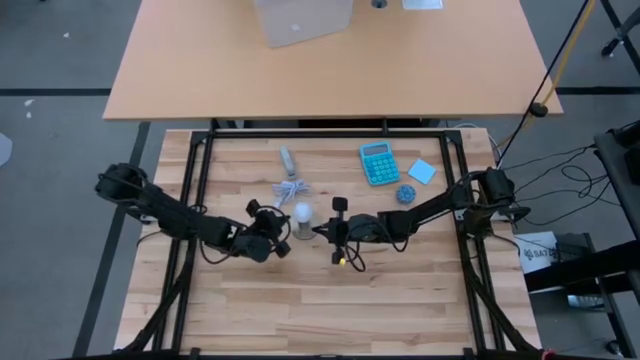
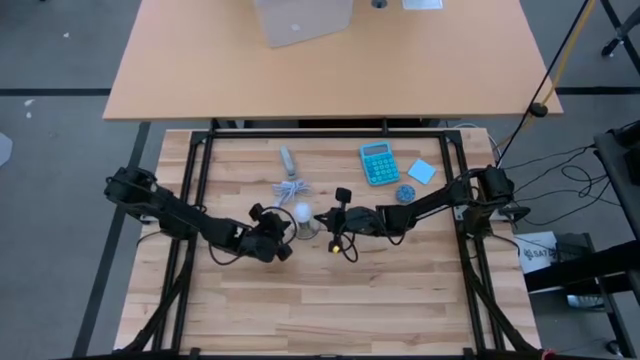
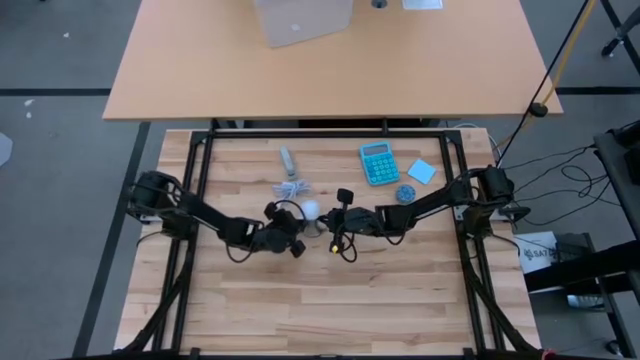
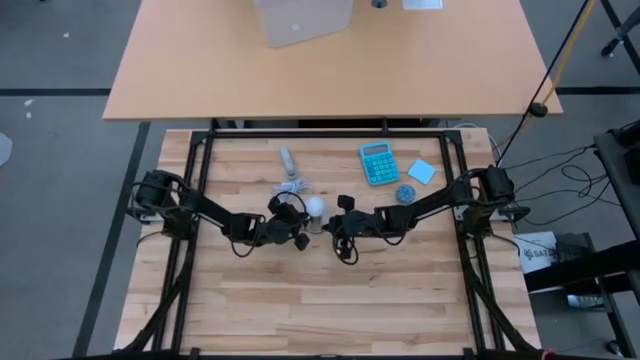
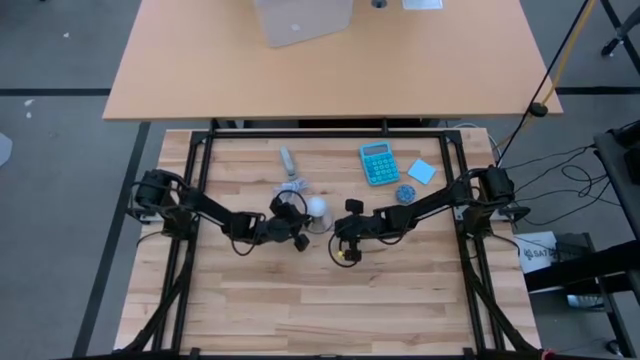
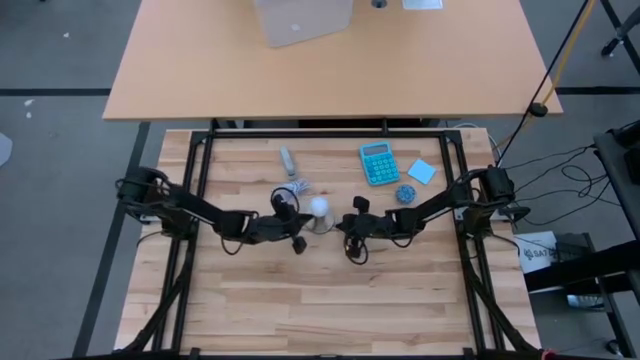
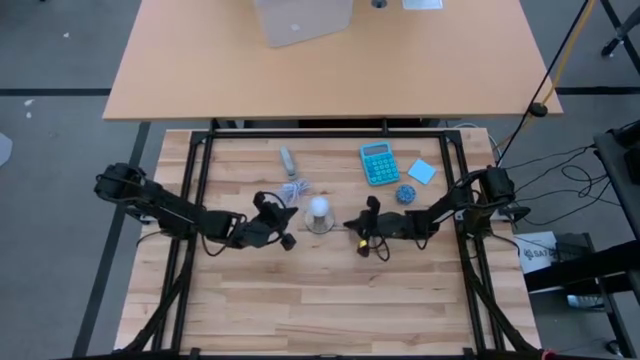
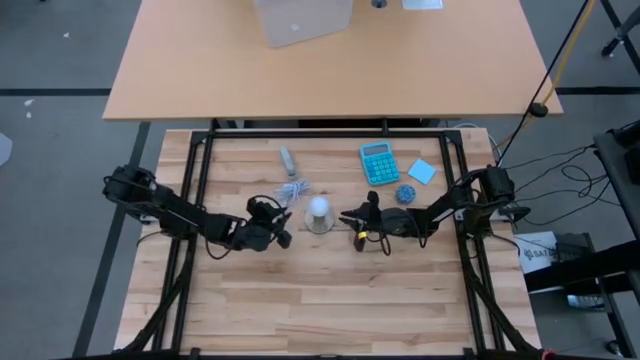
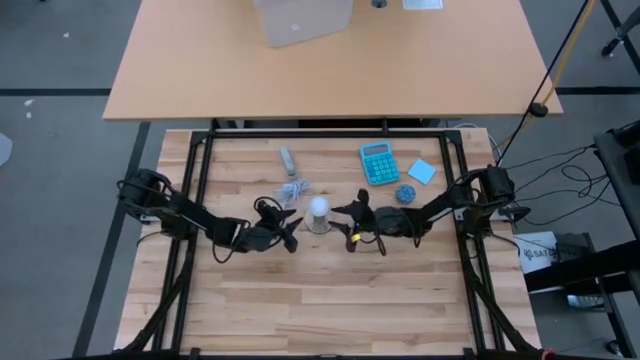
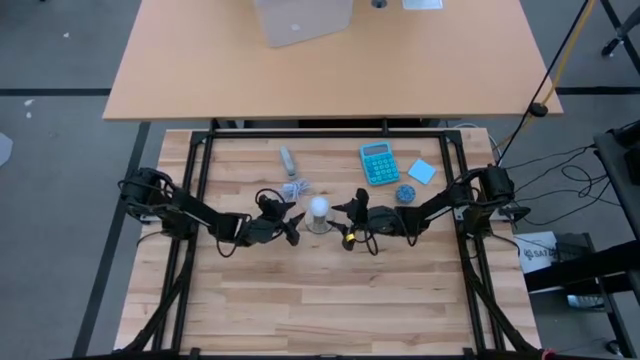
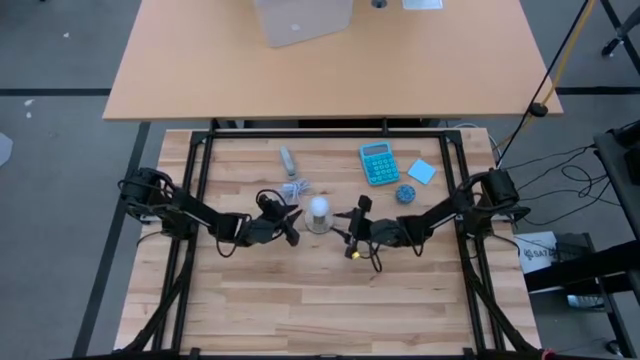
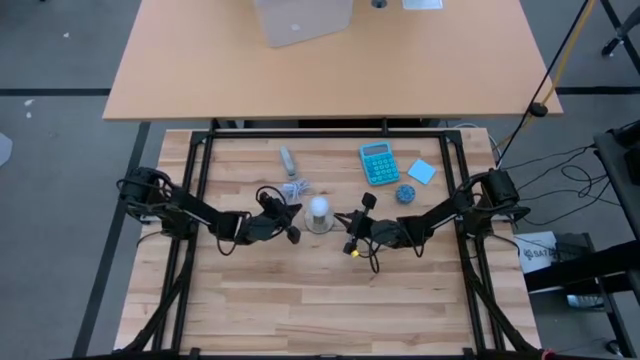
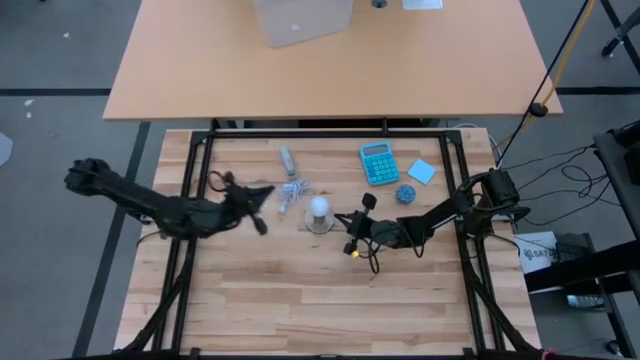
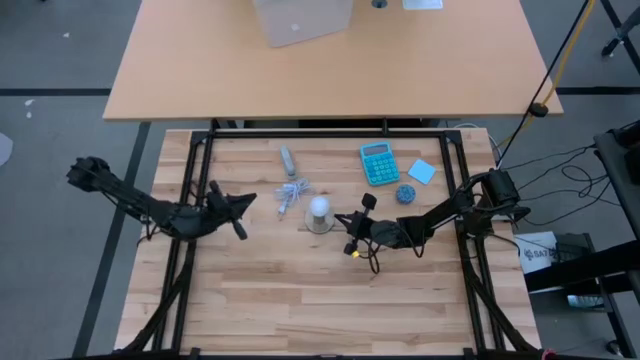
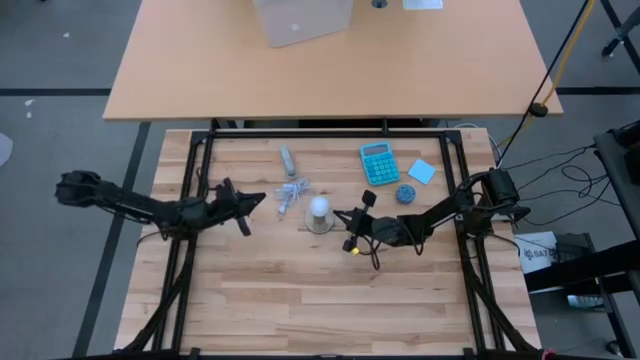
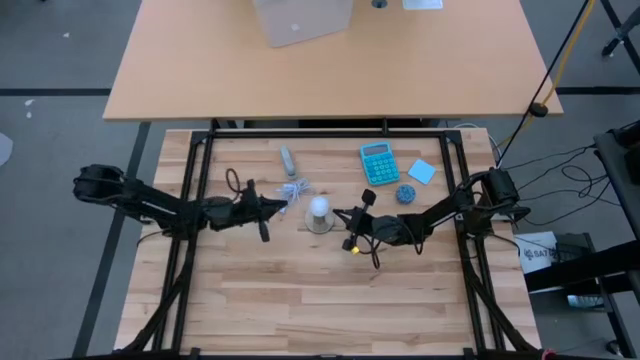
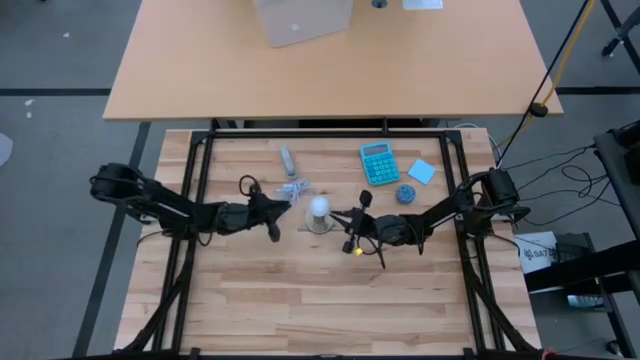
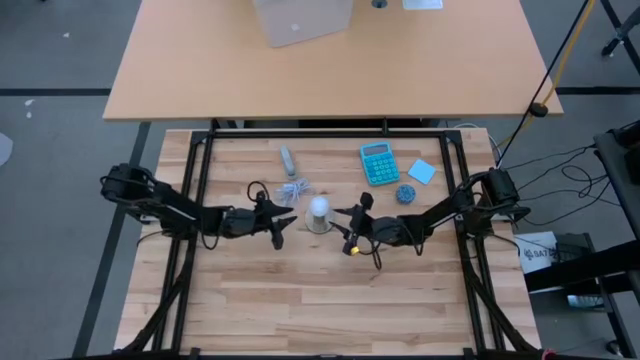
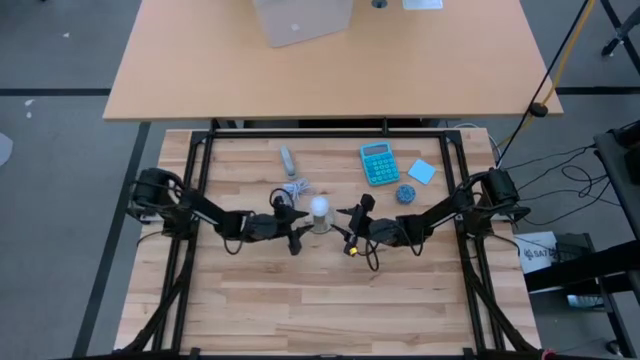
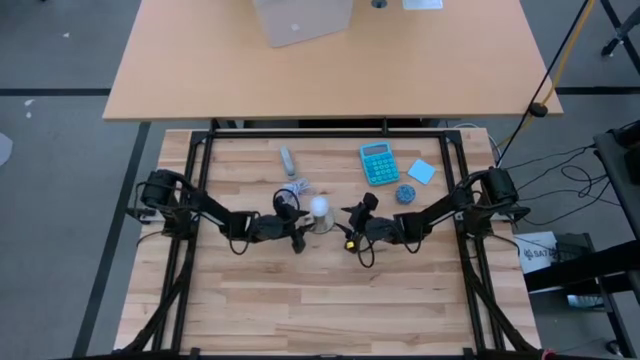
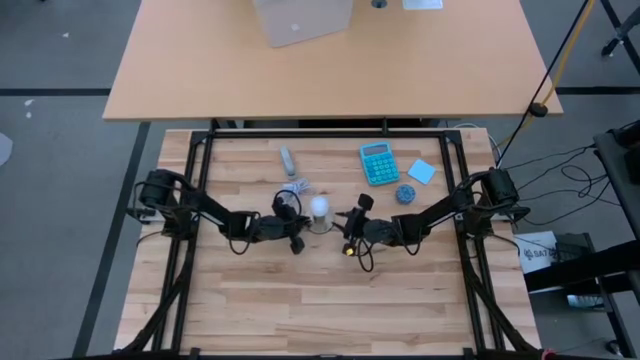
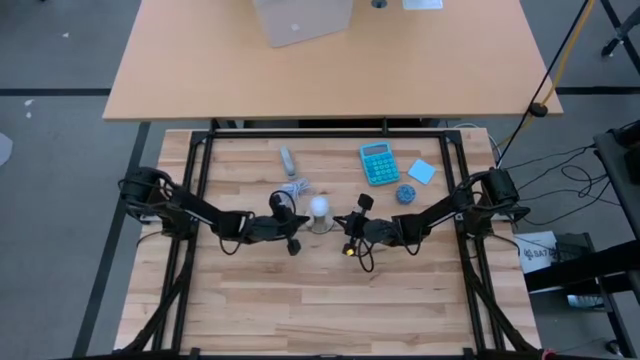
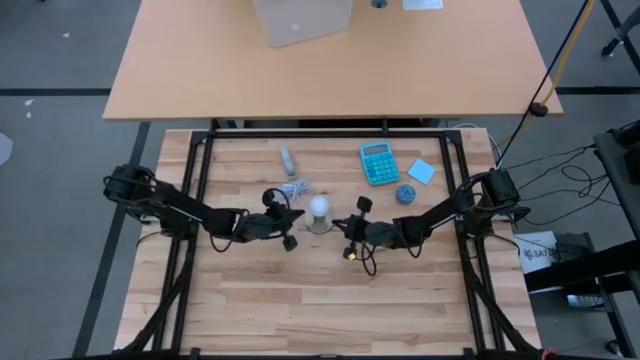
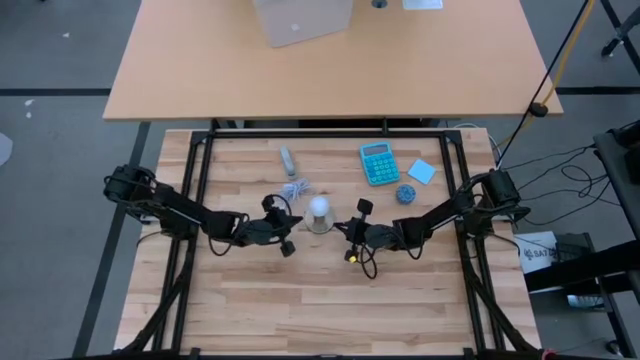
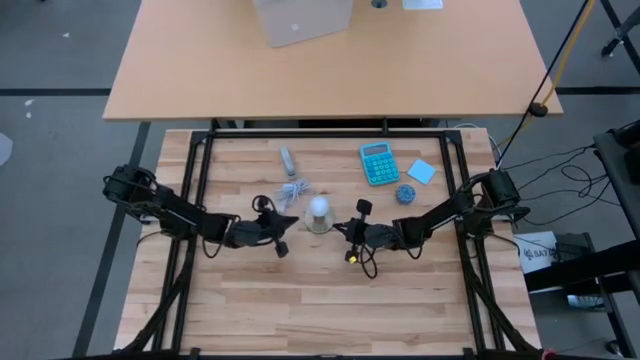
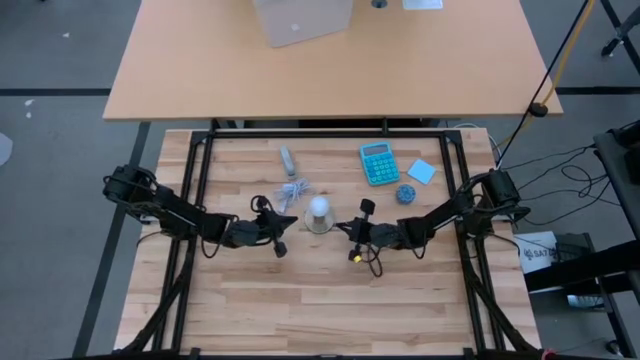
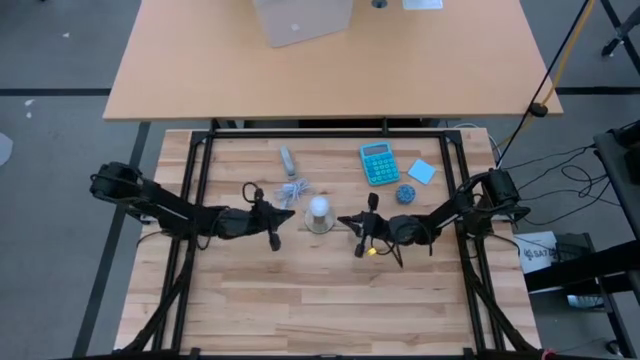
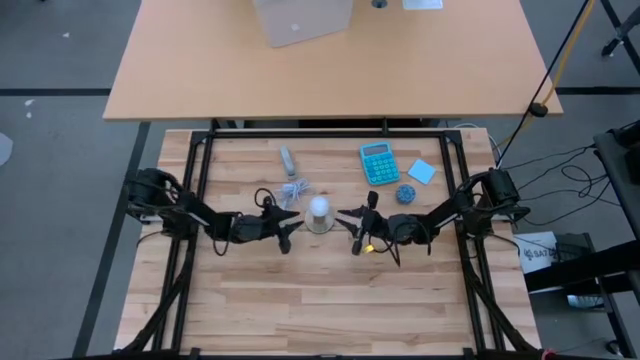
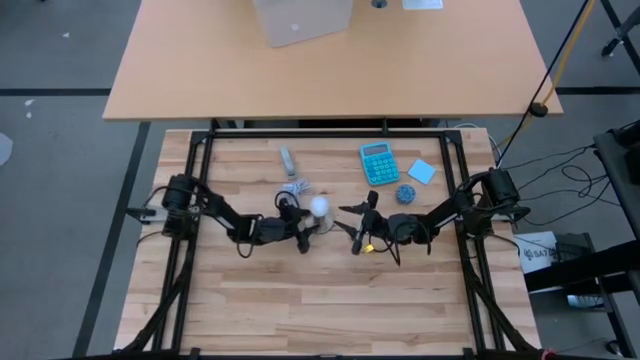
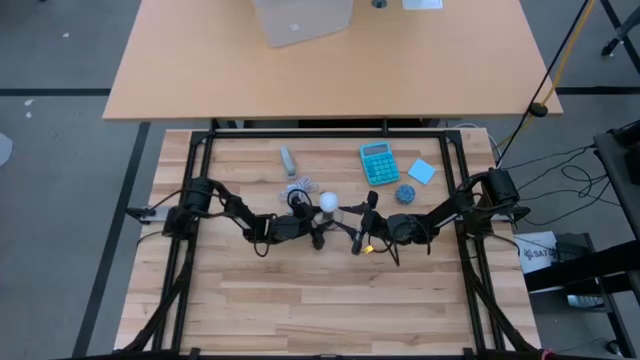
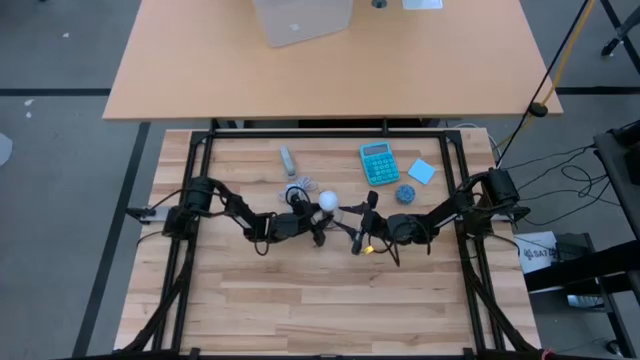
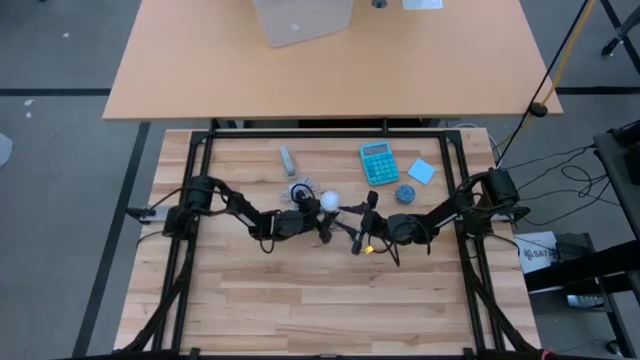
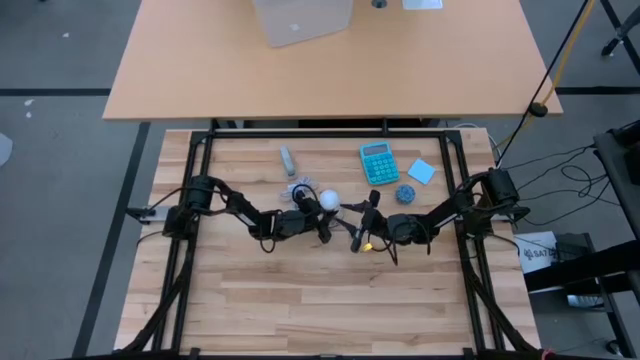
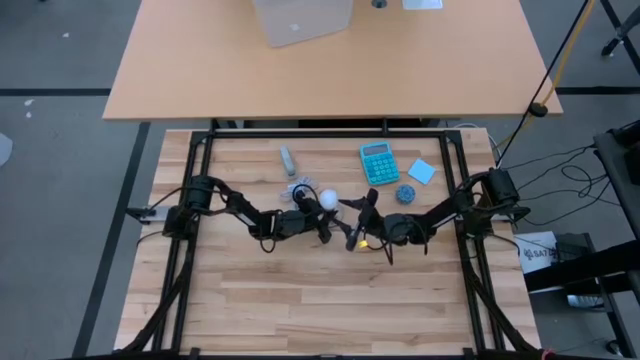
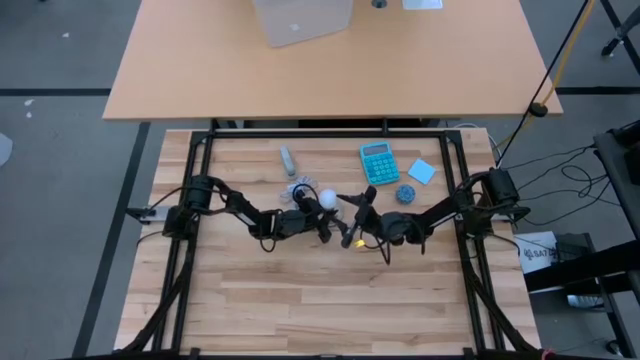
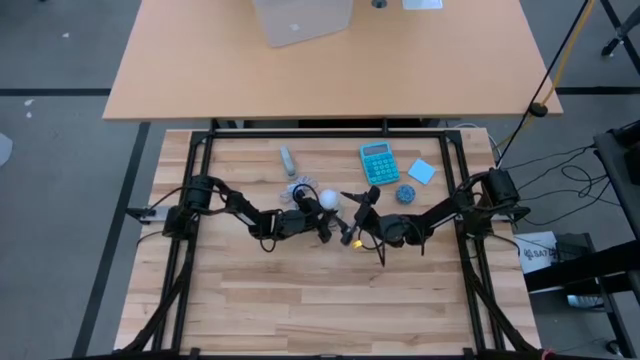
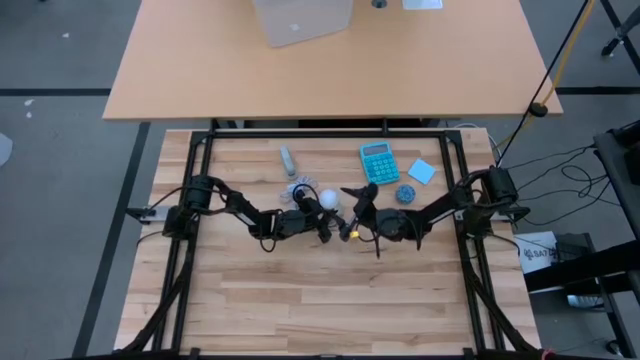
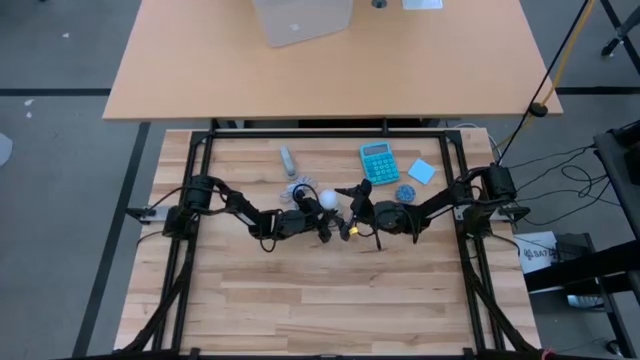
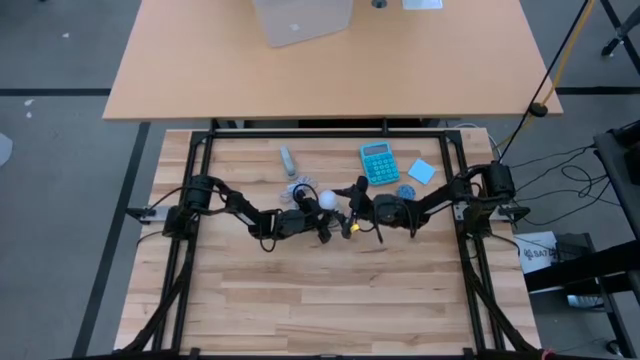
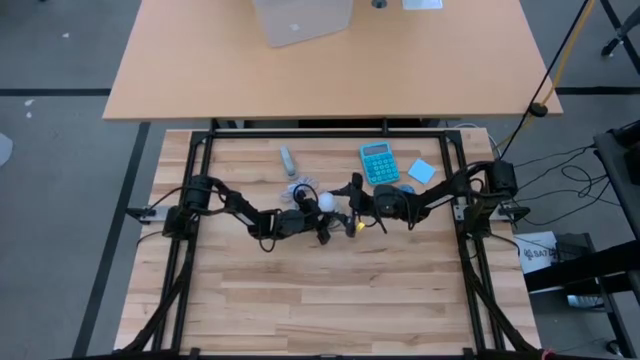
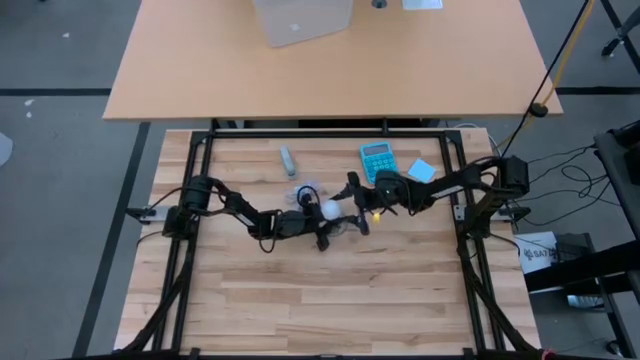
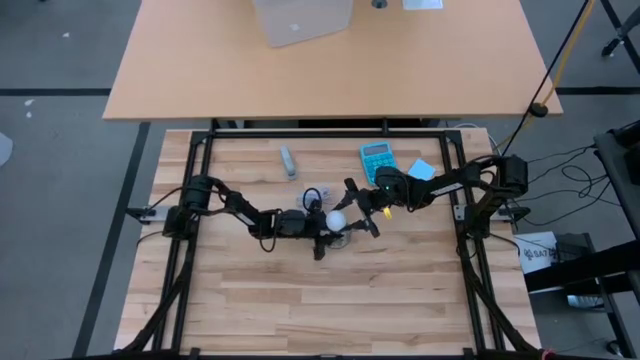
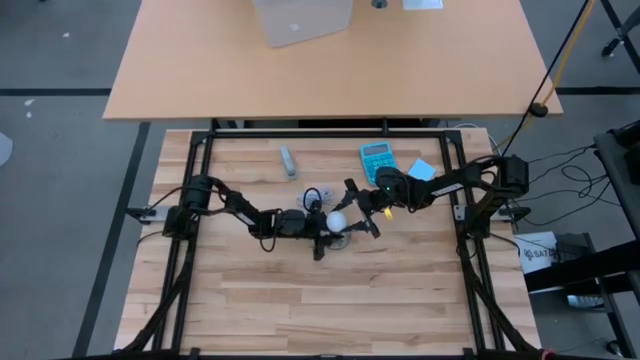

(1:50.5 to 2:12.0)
Task: Screw lightbulb
Remove the white lightbulb from the desk lamp
